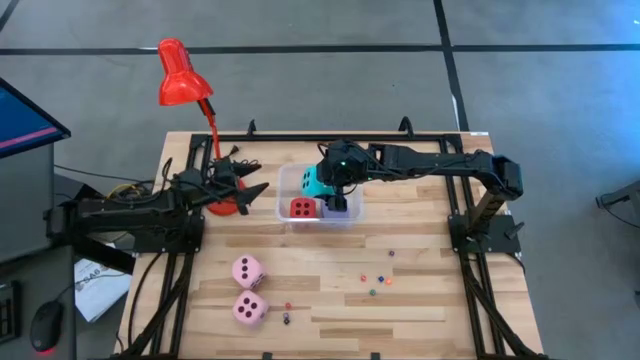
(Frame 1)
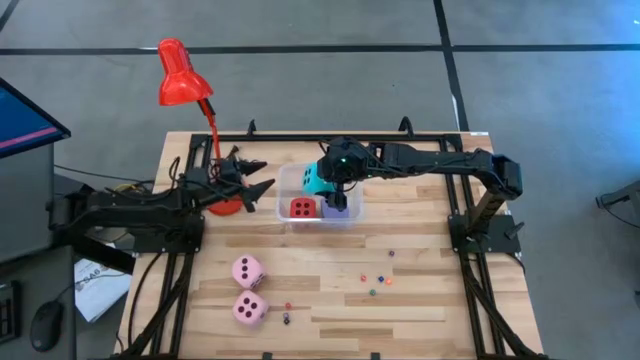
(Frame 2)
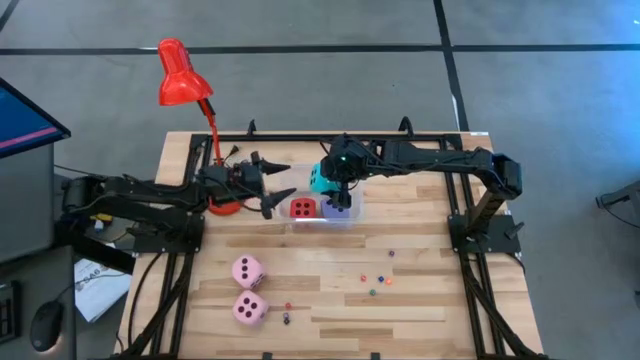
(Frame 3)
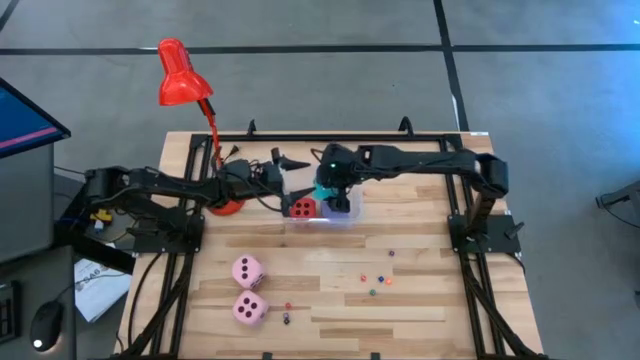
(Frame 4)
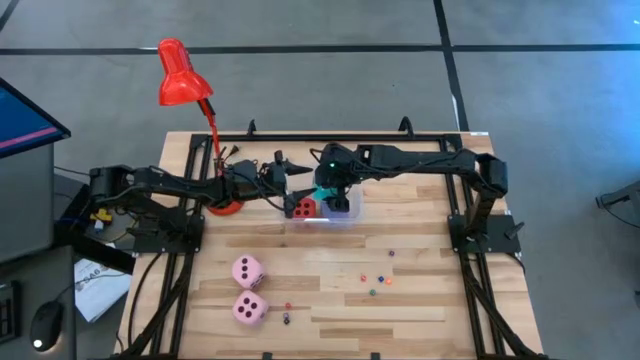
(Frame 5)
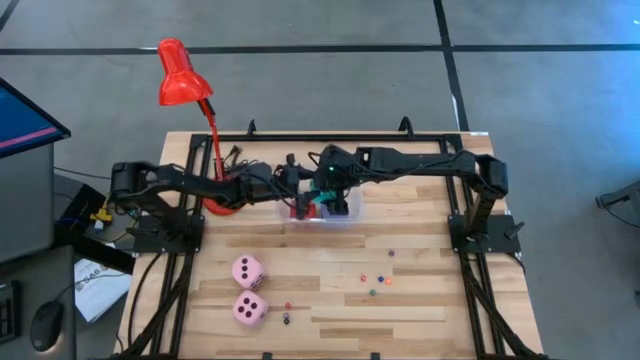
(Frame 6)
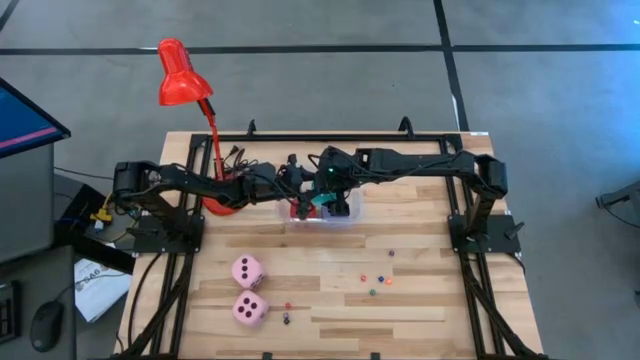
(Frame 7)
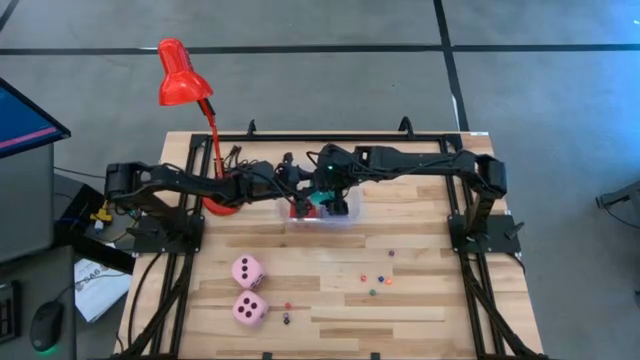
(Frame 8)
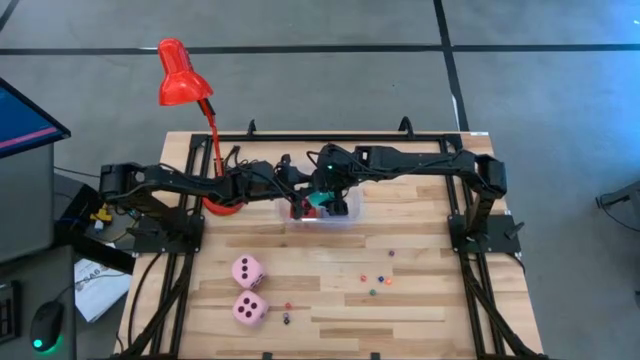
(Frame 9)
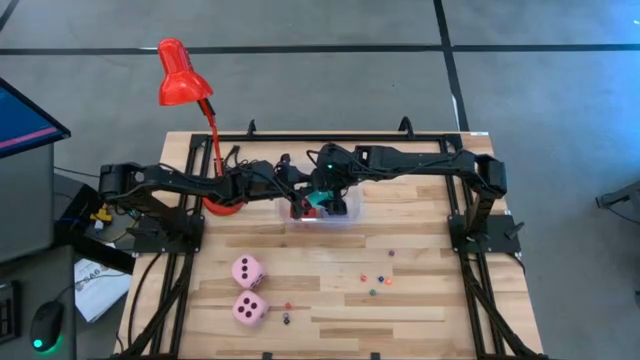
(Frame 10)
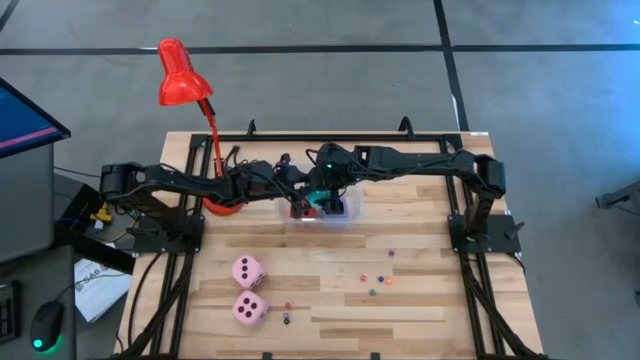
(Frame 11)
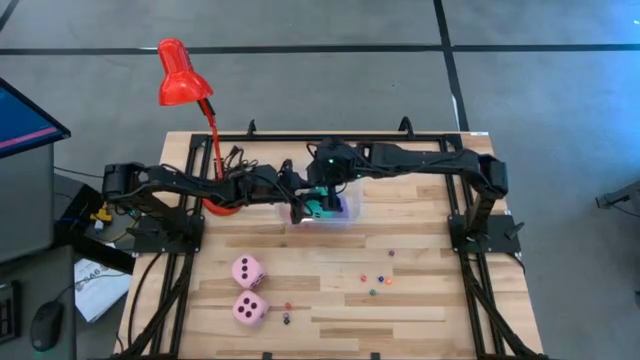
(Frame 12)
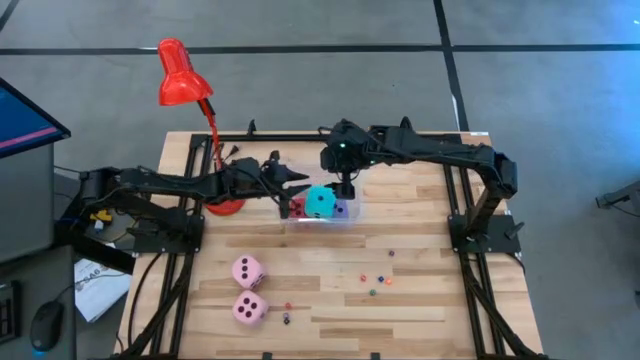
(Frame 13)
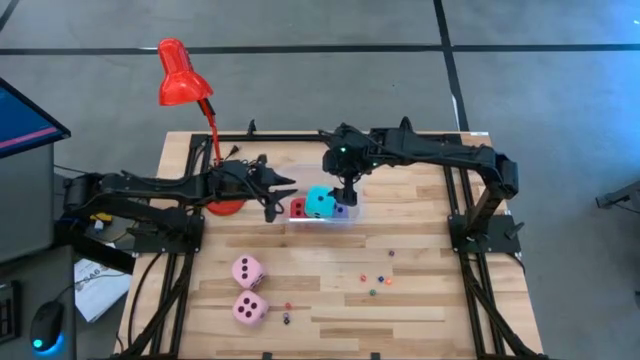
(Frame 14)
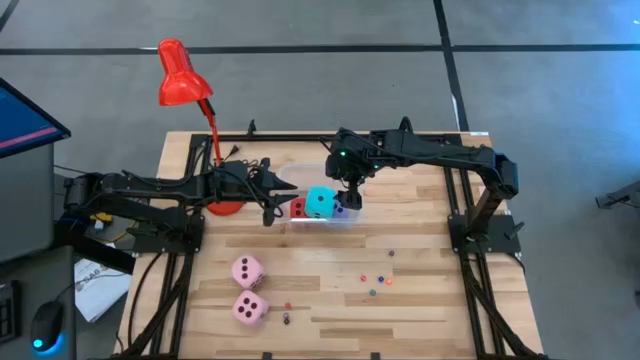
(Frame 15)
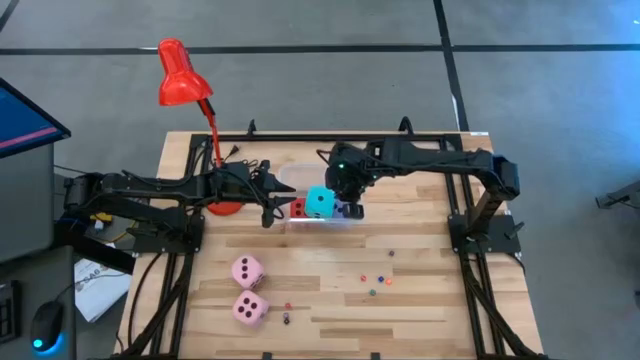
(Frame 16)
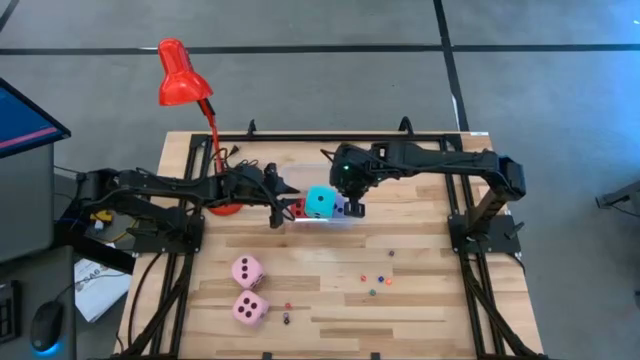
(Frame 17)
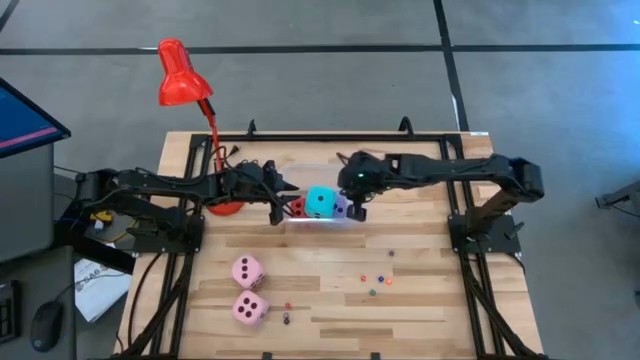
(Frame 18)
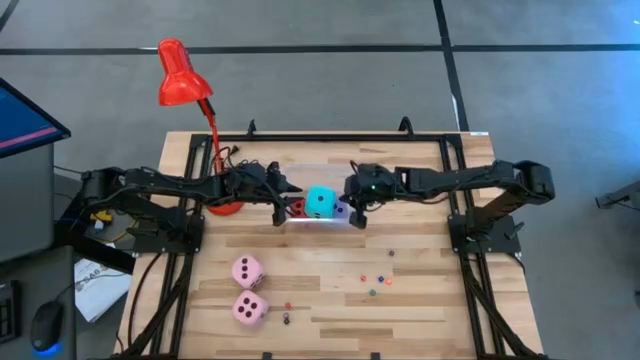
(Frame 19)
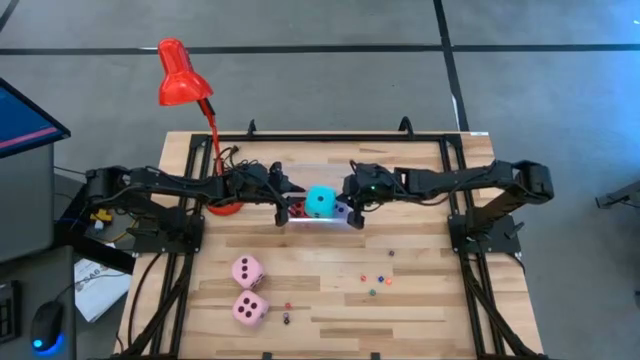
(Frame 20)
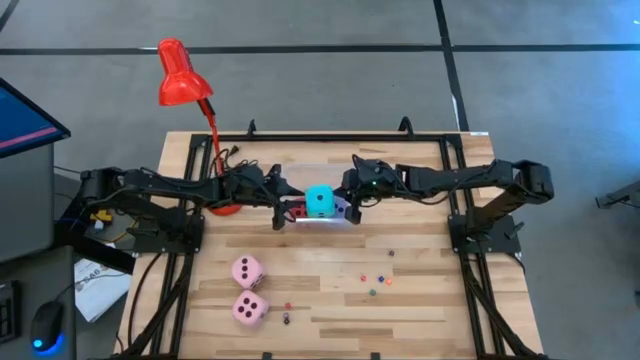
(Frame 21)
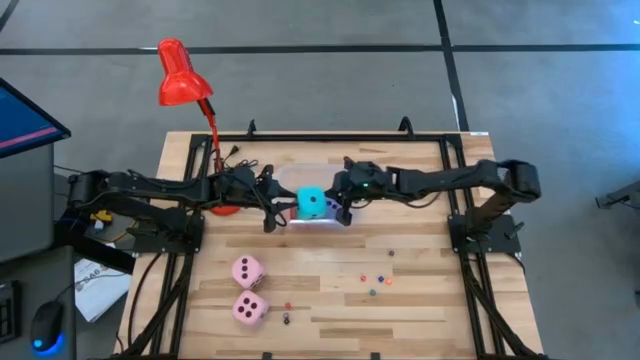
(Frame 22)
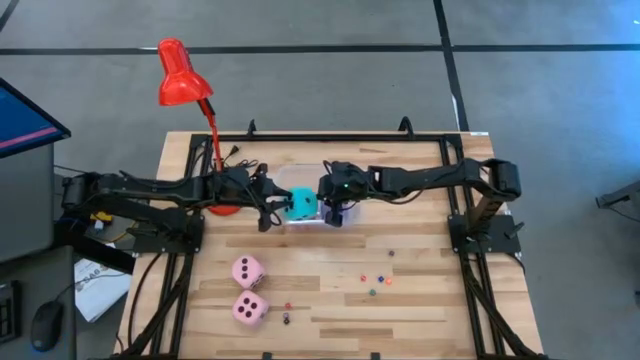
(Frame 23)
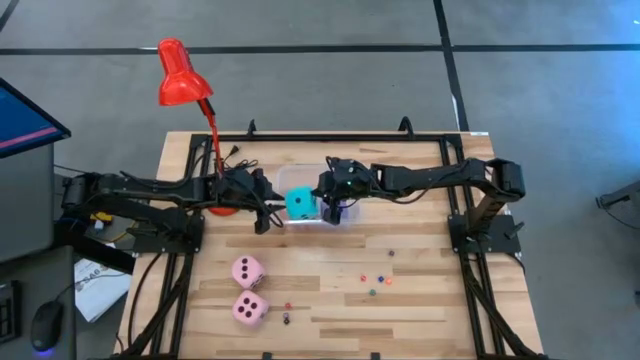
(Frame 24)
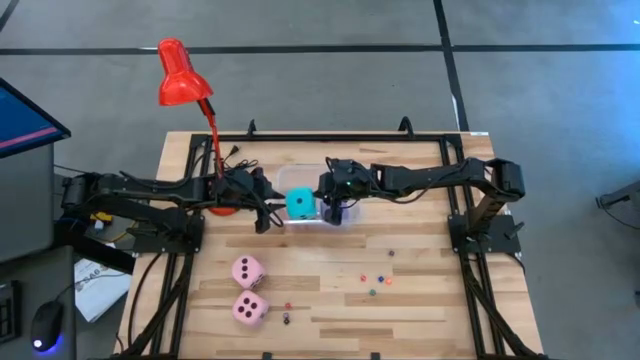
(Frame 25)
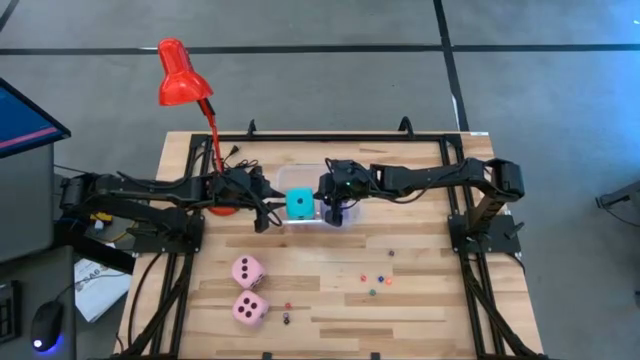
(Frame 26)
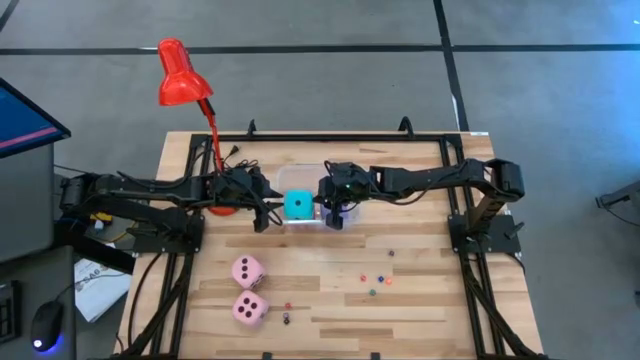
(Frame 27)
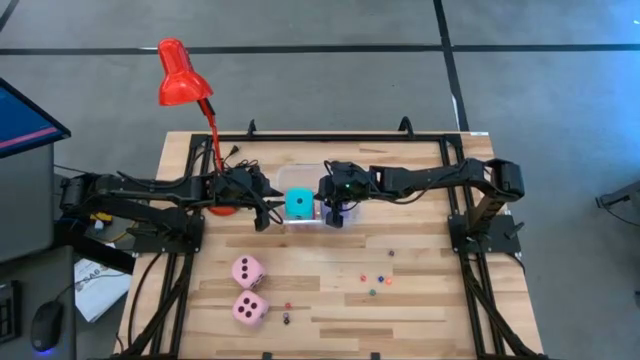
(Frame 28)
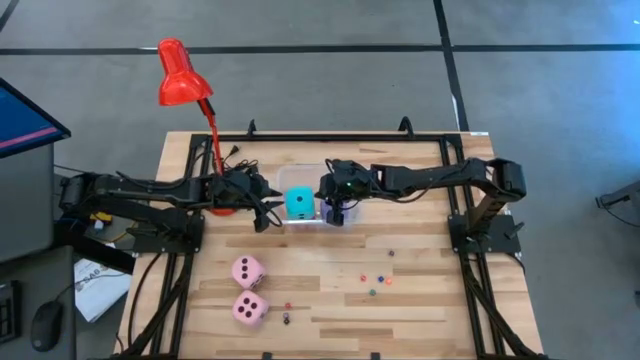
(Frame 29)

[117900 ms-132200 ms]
Task: Pick & Place Dice
Put the large blue die into the transparent bin

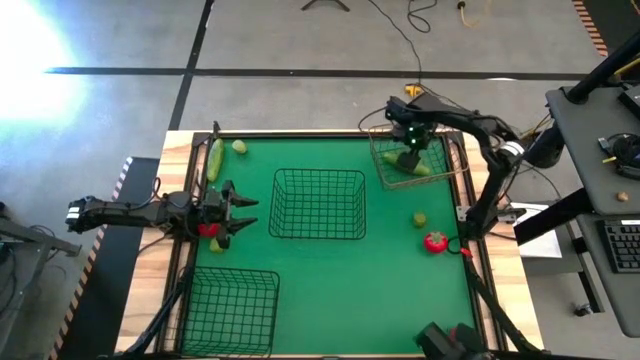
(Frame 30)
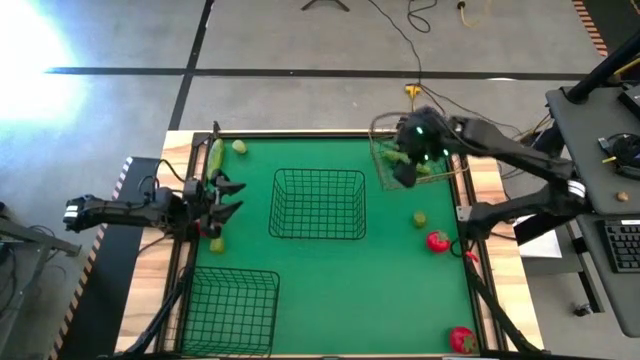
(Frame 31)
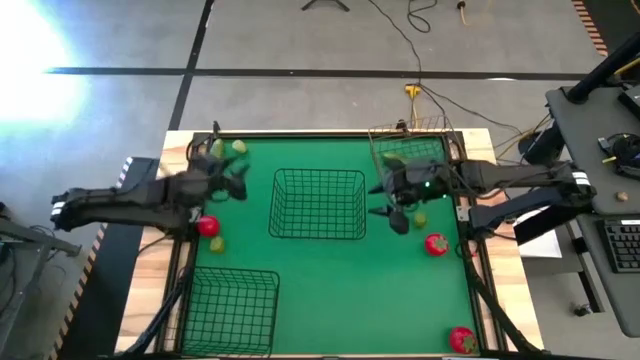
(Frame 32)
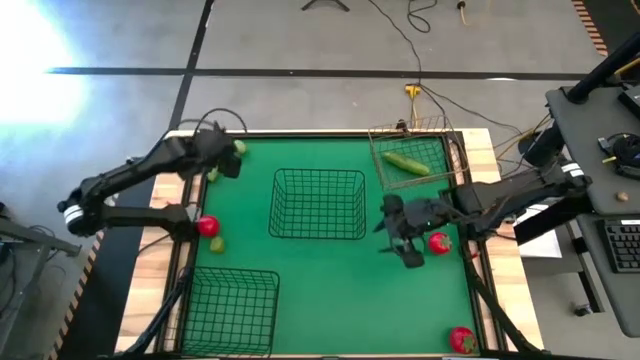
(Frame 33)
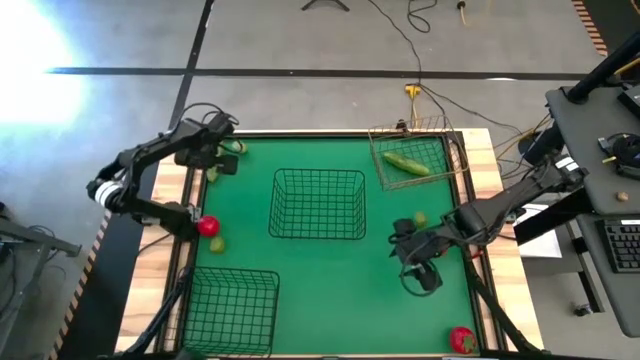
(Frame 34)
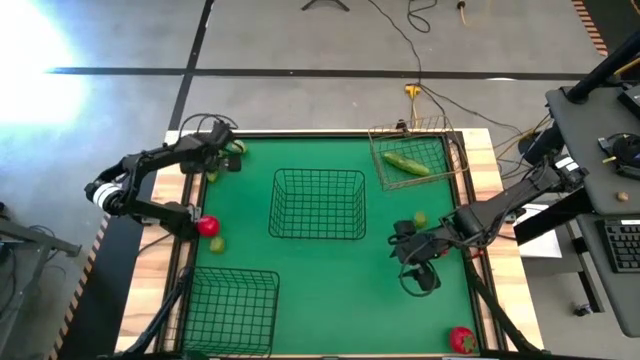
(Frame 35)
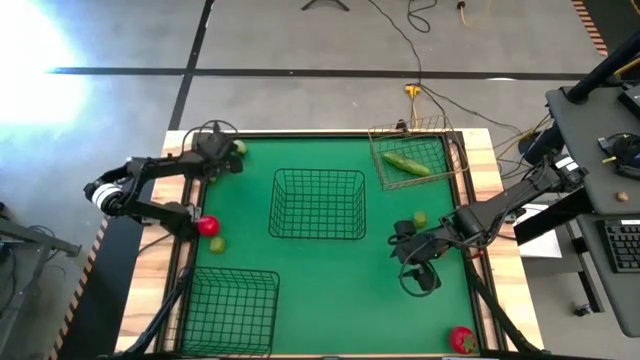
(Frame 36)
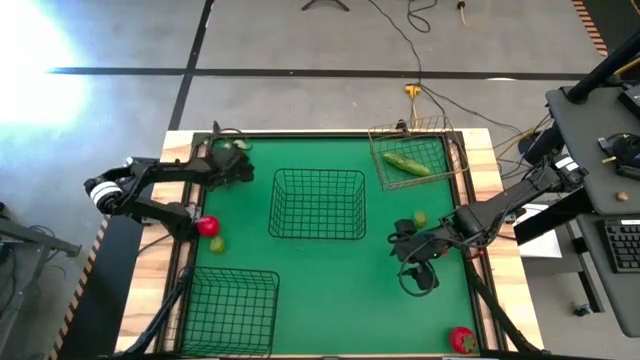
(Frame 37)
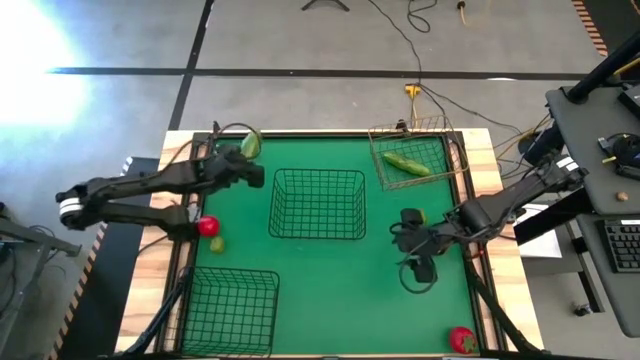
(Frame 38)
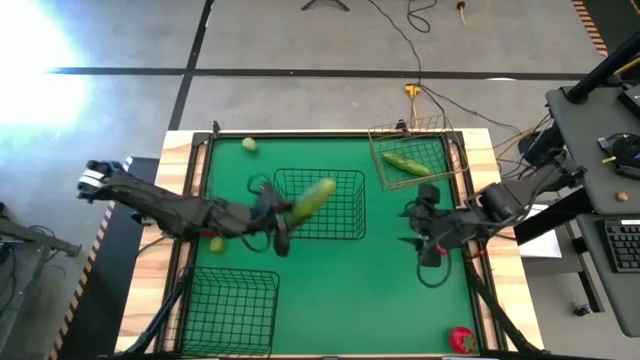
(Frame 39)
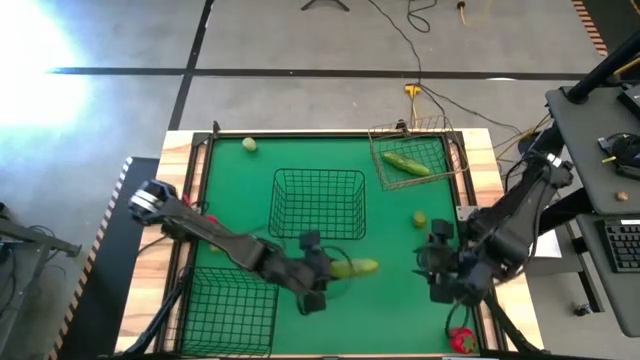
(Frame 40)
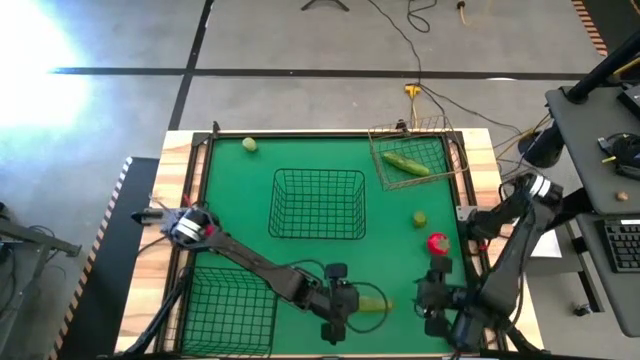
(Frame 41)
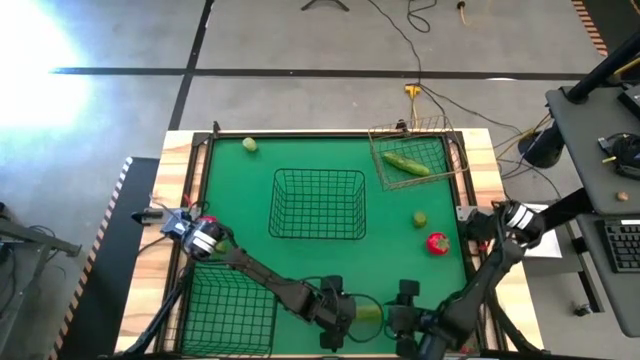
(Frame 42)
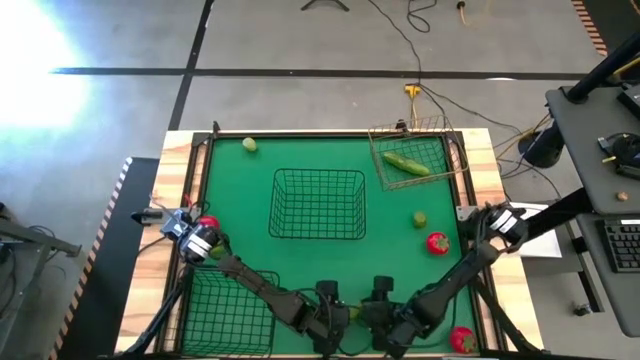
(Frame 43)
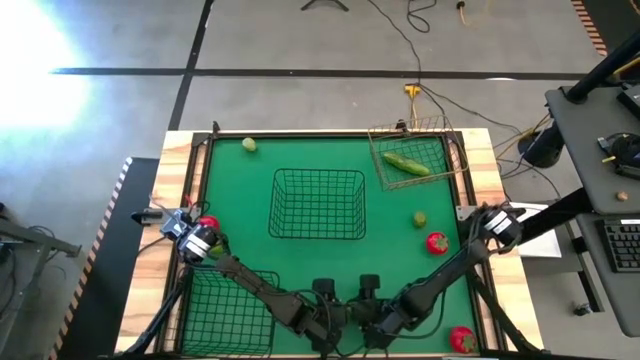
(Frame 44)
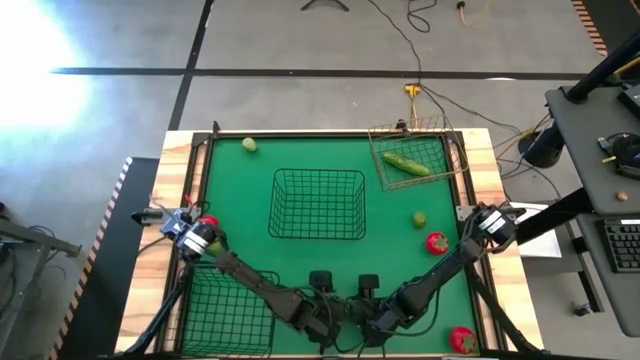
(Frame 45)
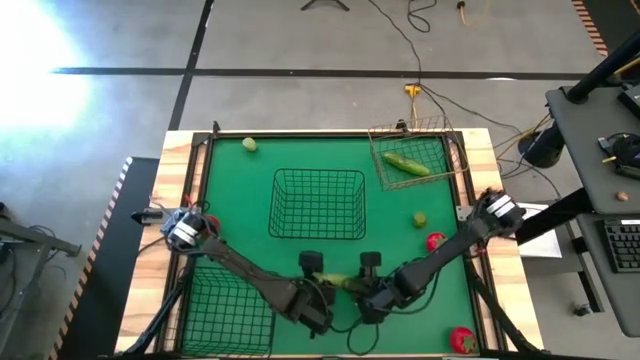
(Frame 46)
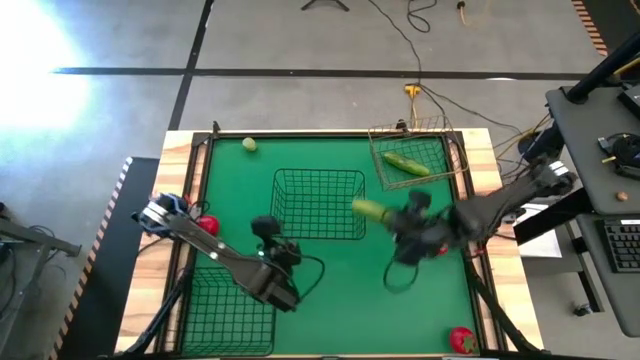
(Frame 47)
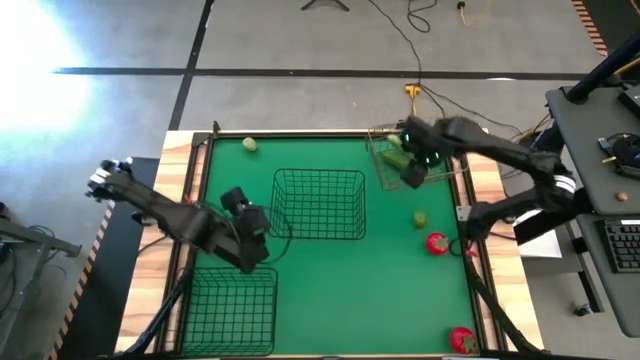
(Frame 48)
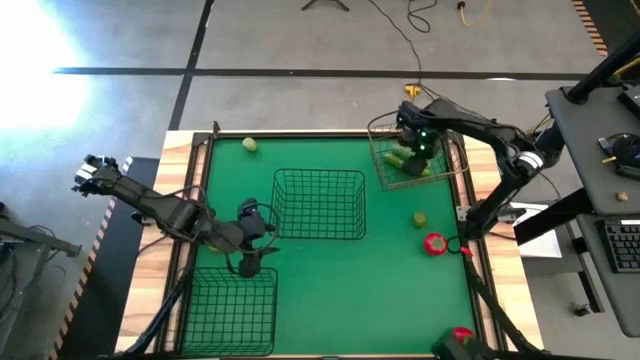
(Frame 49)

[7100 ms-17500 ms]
Task: Sort produce into baskets
Put the green cucumber into the gold wire basket
